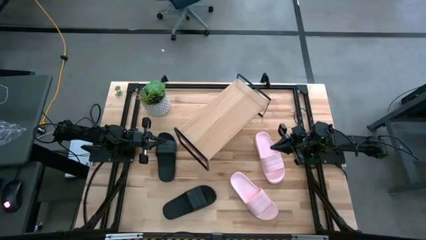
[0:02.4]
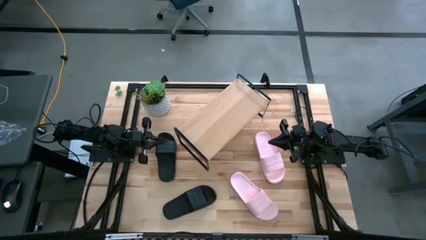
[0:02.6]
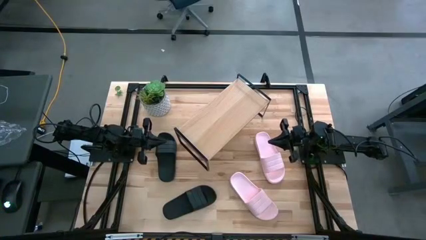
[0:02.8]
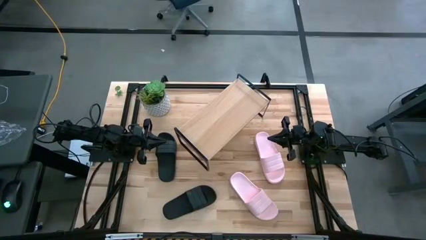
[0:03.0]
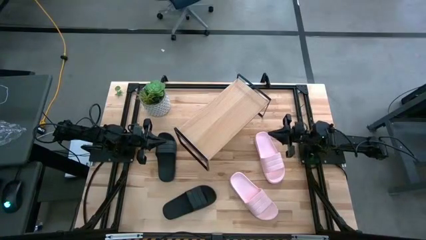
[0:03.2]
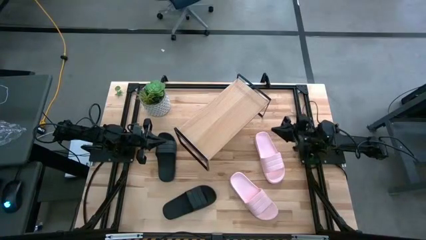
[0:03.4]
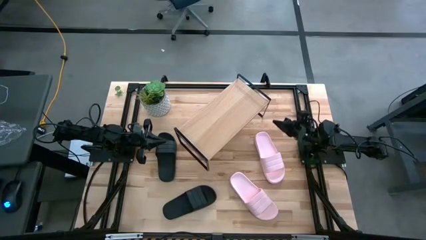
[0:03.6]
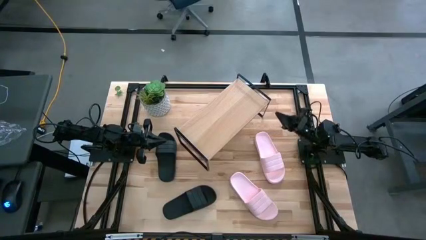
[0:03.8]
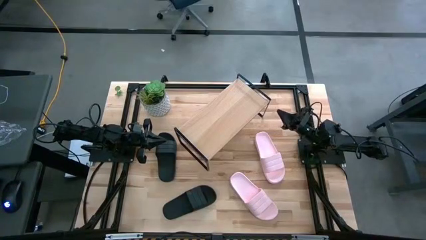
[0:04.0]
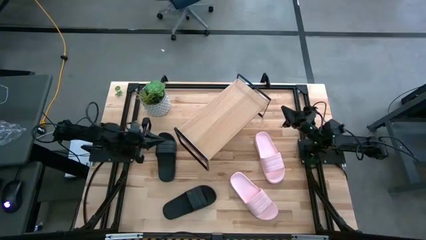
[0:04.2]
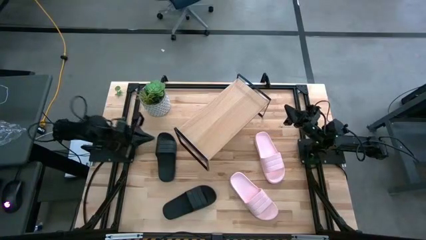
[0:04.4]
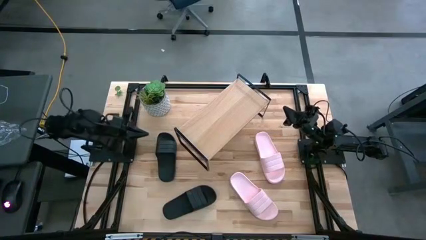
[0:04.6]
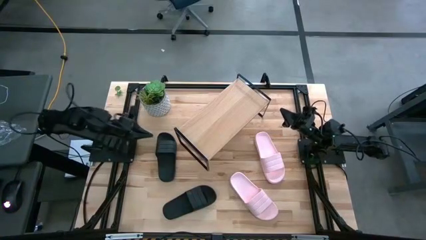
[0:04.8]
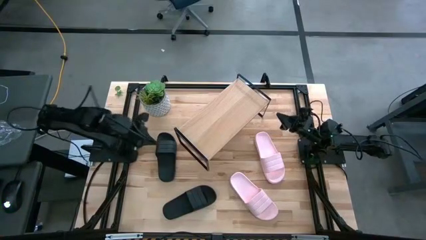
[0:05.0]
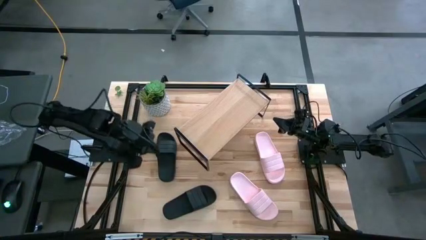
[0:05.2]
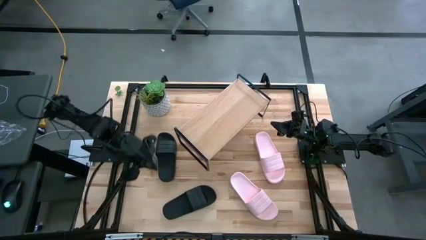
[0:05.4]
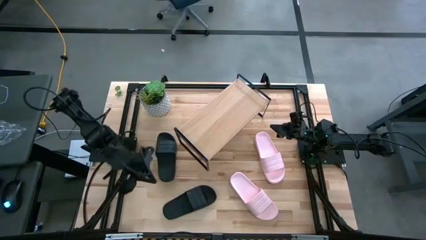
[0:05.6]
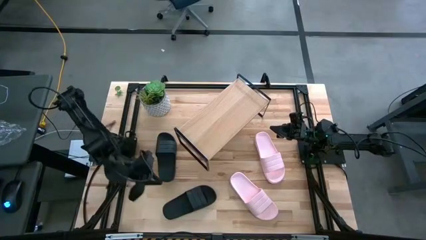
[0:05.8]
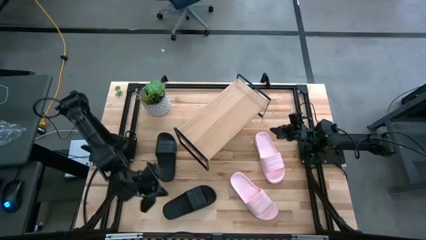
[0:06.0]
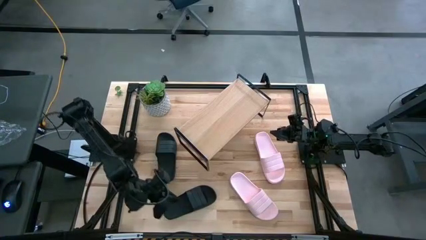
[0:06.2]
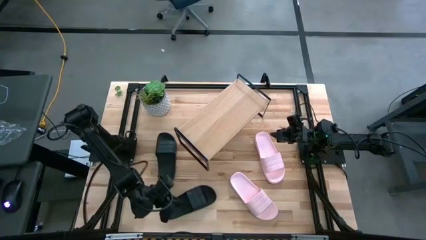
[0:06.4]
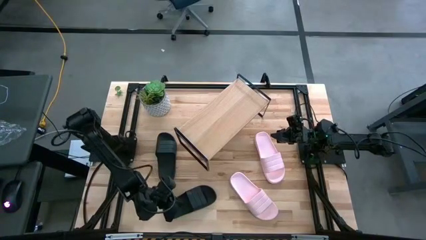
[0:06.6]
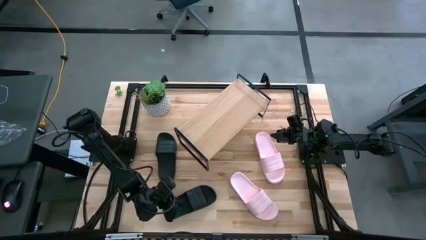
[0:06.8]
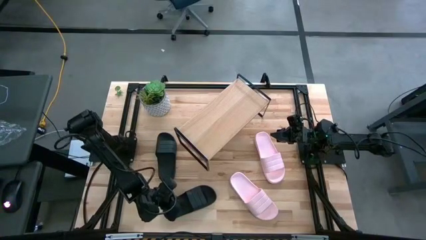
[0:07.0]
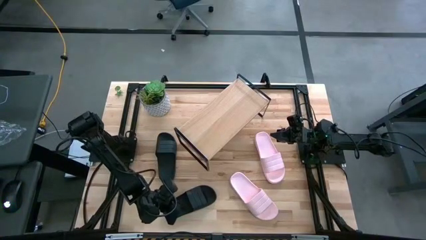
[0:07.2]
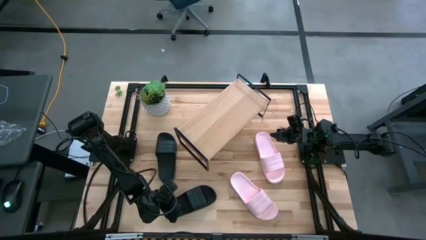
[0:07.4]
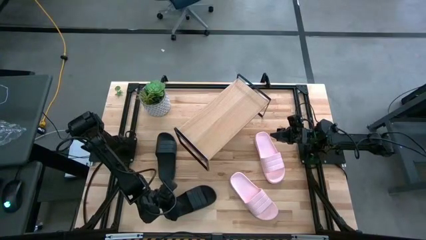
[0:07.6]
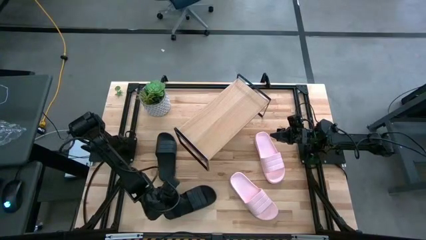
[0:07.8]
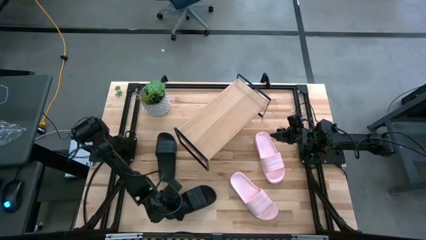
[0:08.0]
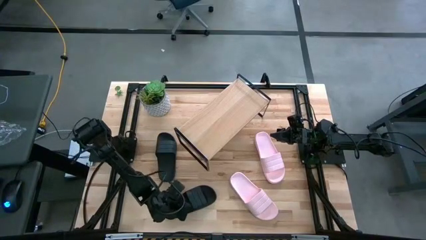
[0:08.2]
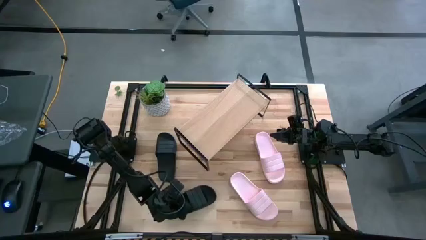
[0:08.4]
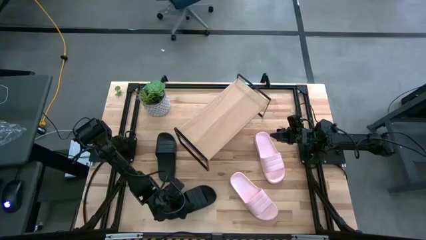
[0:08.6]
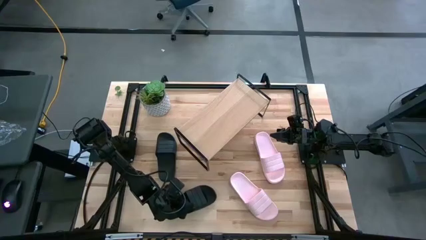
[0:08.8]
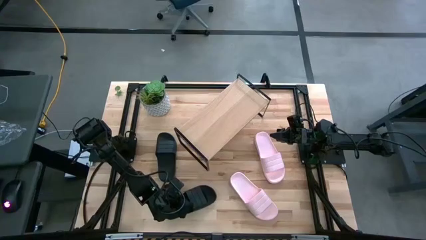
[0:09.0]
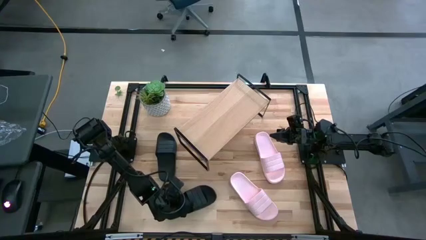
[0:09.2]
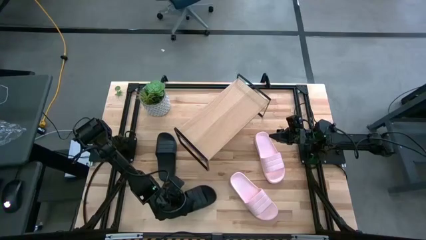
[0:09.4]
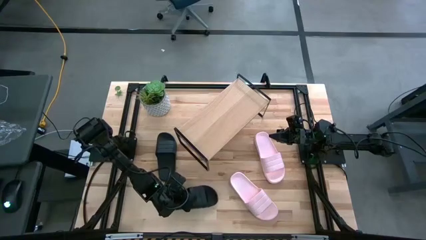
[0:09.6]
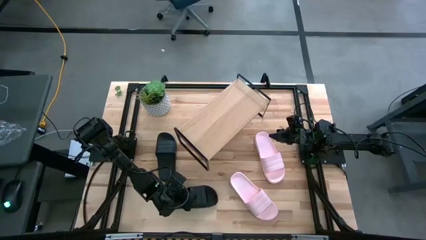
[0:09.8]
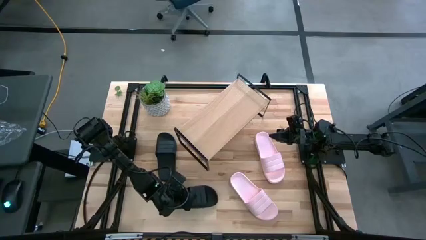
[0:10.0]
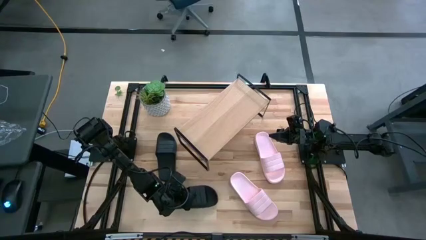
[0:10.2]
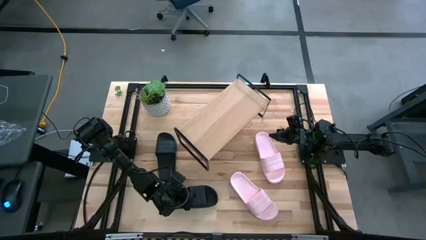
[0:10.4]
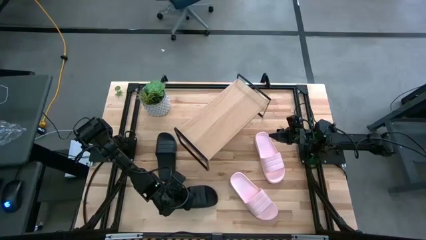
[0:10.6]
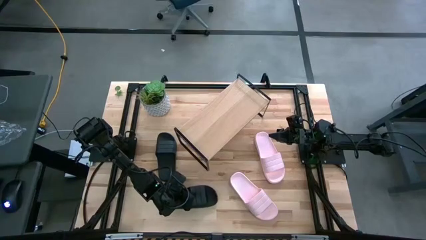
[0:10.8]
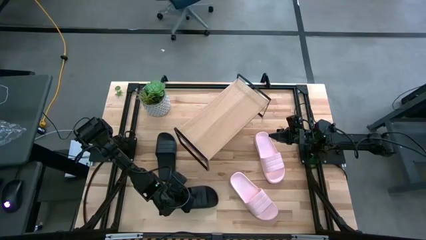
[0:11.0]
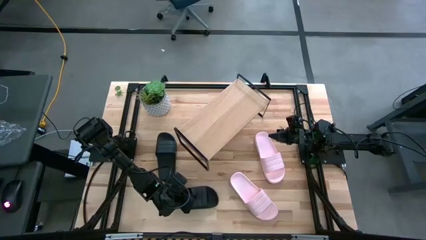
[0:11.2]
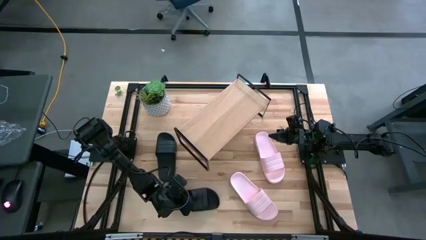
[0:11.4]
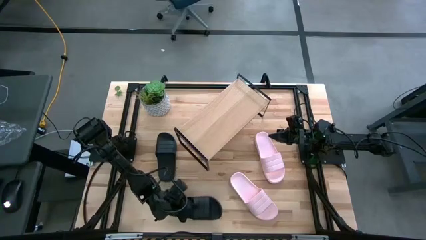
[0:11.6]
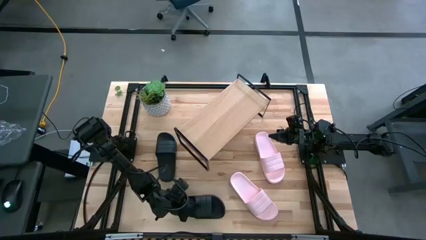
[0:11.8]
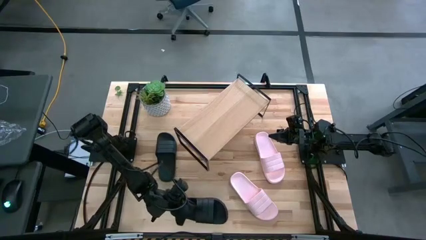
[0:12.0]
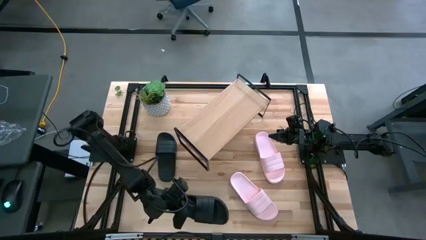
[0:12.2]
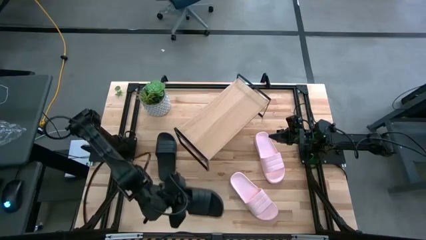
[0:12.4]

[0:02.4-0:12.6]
Task: Pick and place slides into the shelf
Put the bottom black slide on the shelf
